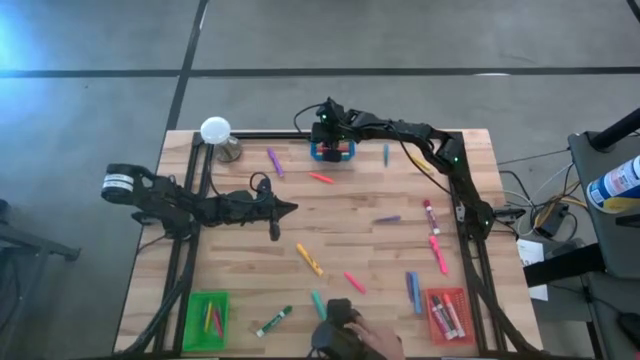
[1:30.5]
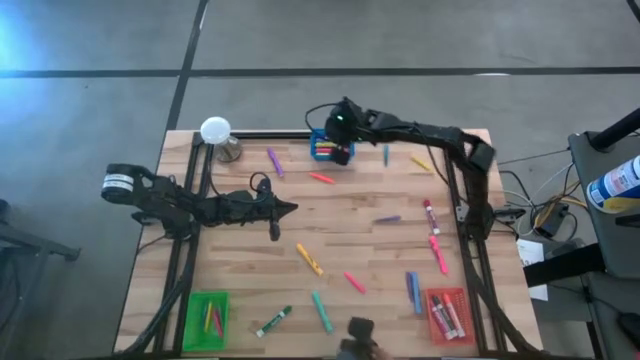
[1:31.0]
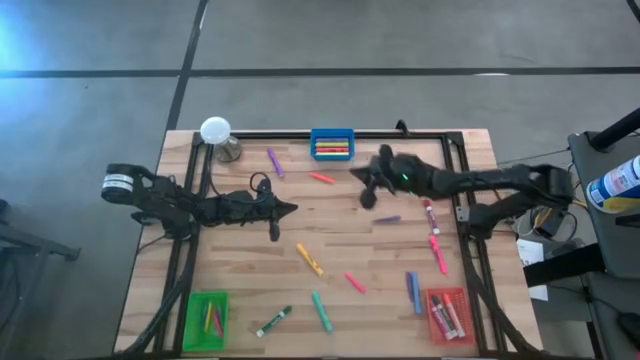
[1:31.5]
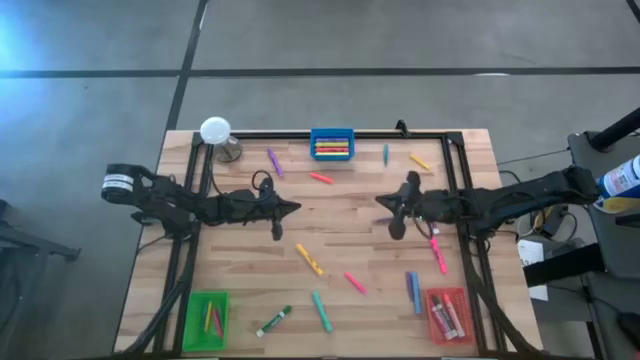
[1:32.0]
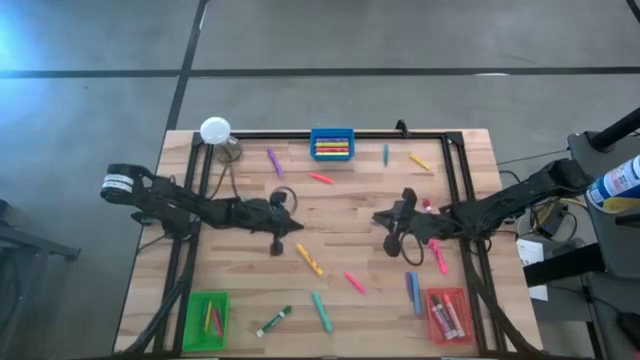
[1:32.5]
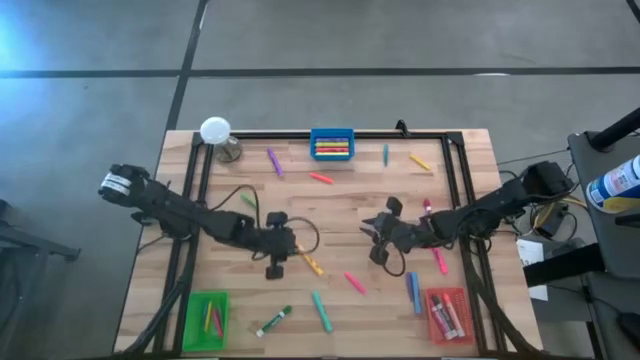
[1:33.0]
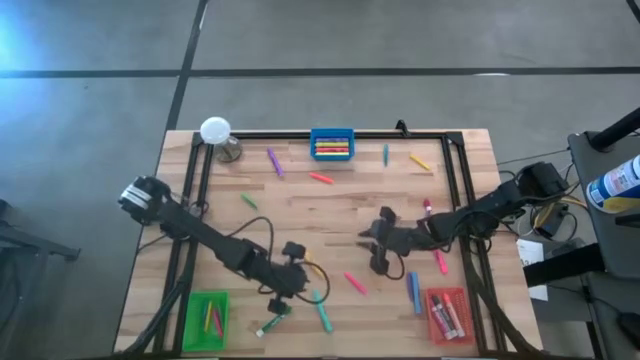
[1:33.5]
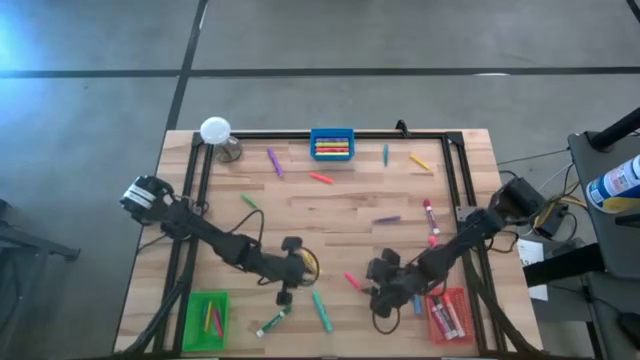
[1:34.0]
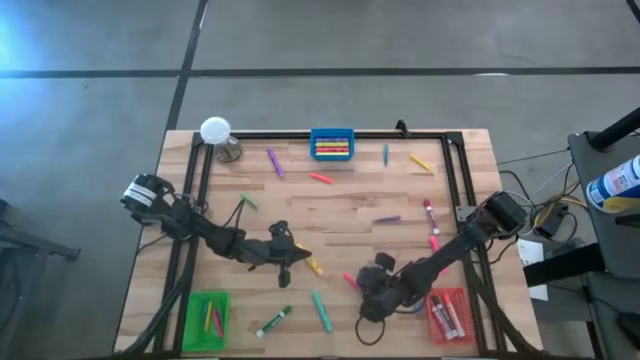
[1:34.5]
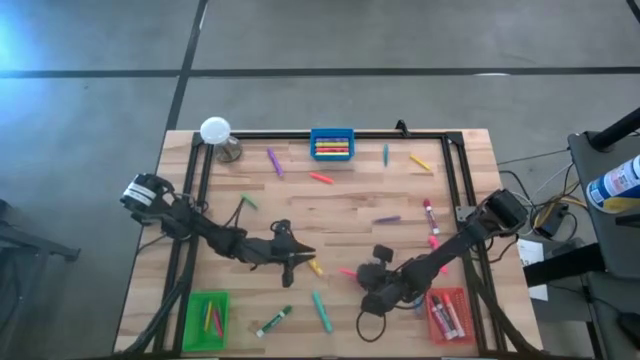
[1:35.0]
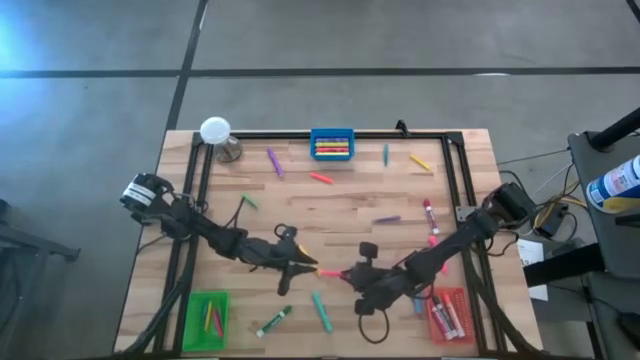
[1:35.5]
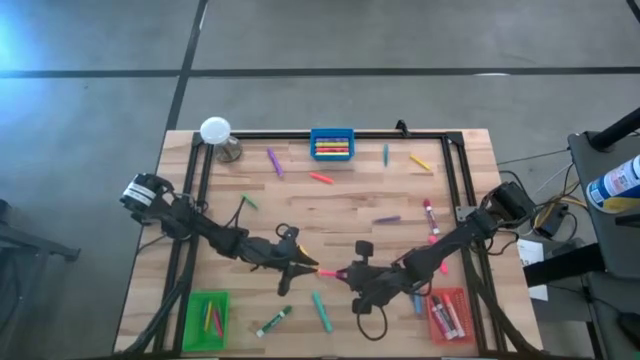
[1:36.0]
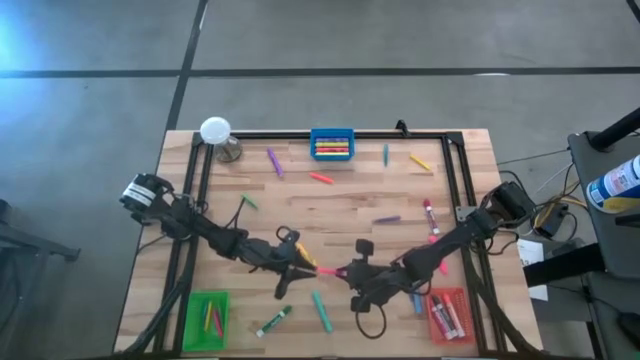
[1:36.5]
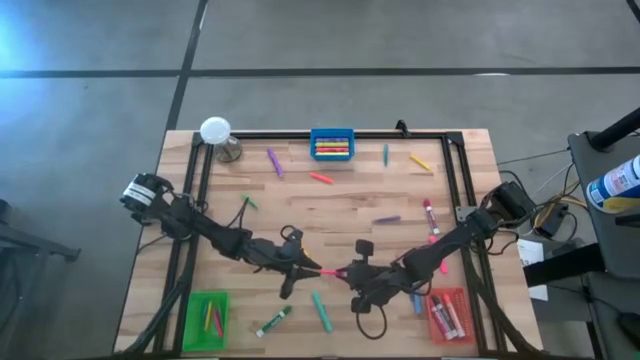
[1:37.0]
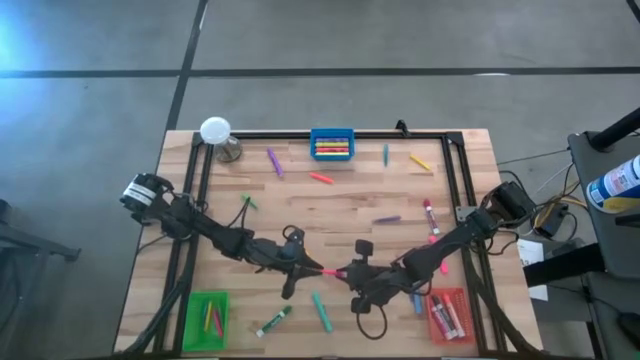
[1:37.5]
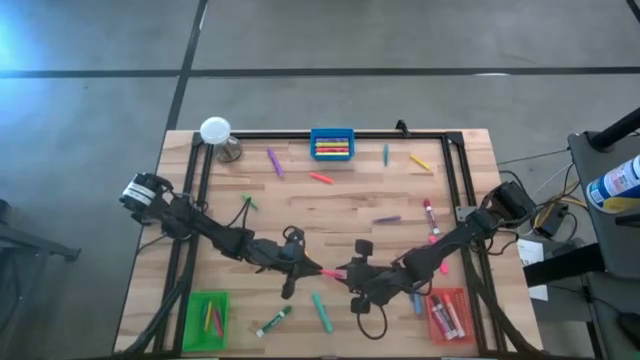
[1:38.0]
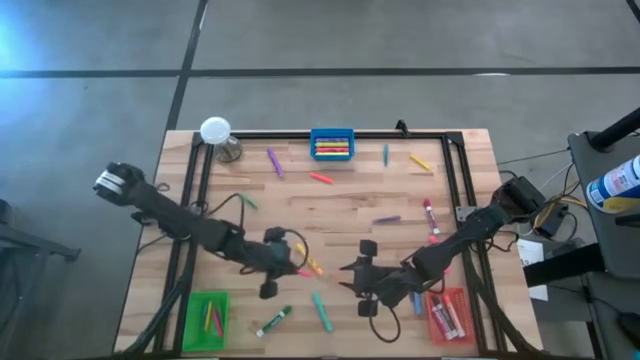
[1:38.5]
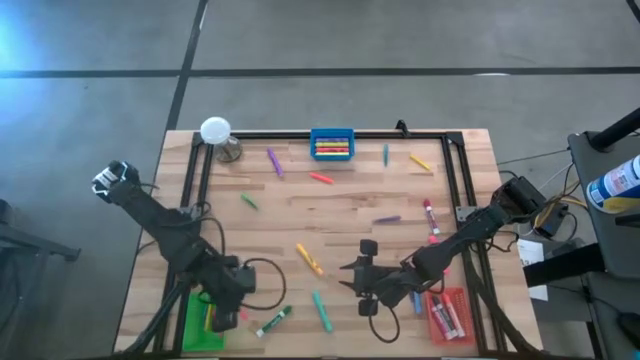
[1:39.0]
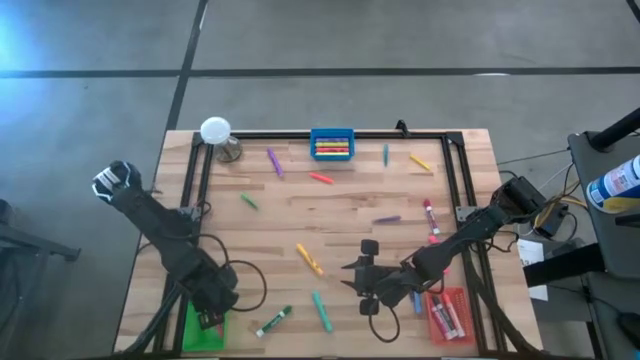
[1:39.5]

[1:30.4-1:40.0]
Task: Pick & Place Markers
Put the pink pen into the green bin

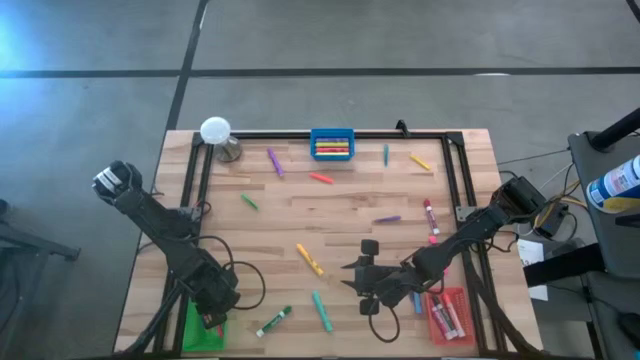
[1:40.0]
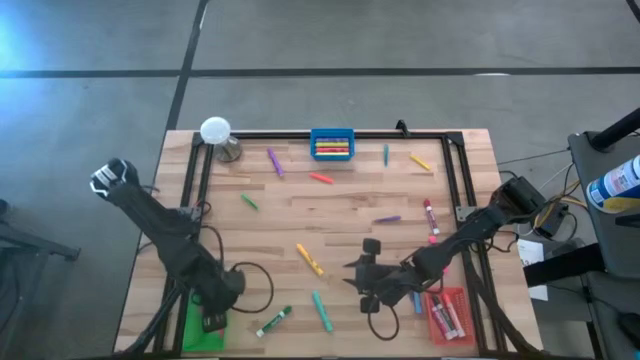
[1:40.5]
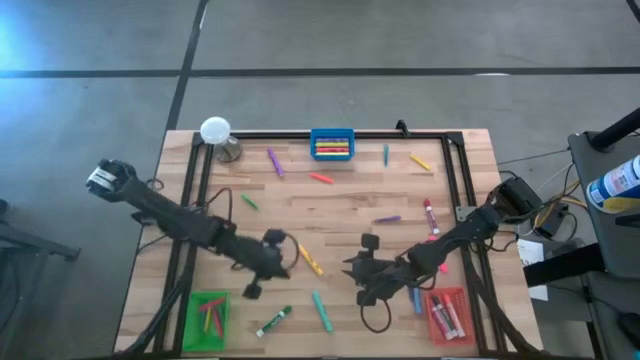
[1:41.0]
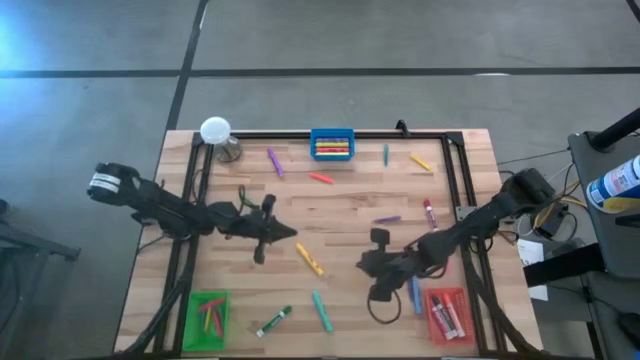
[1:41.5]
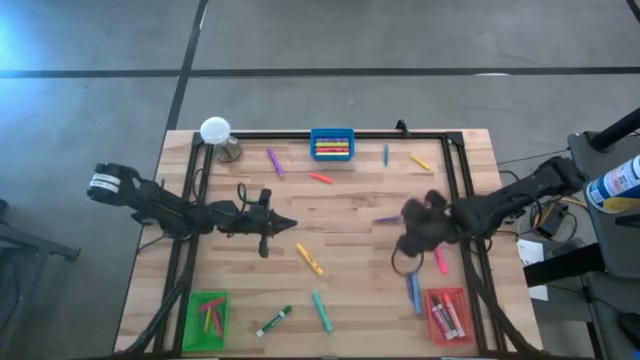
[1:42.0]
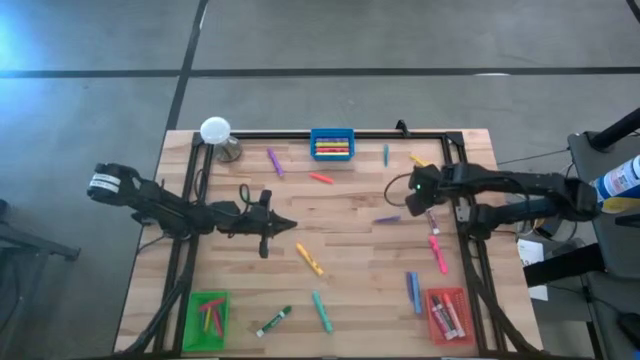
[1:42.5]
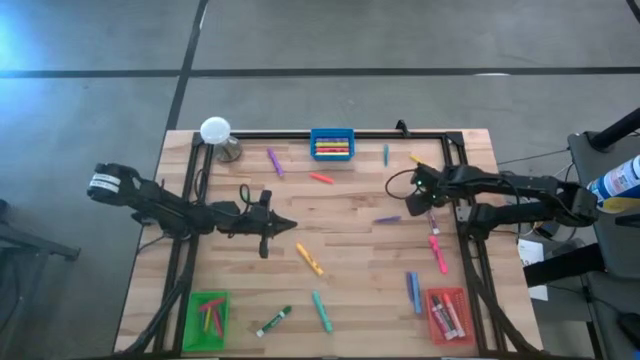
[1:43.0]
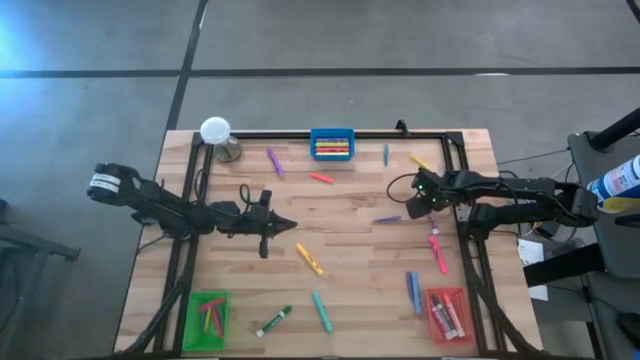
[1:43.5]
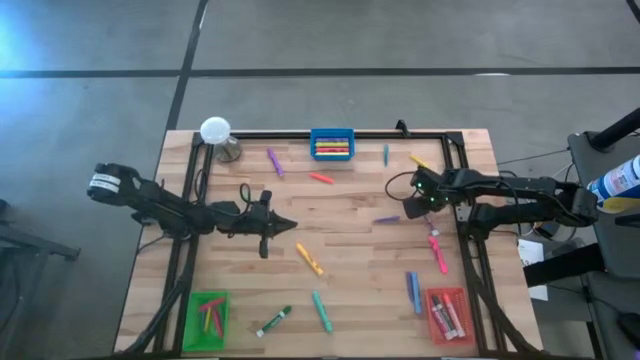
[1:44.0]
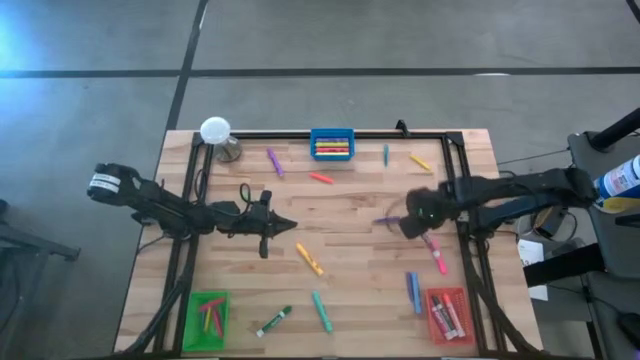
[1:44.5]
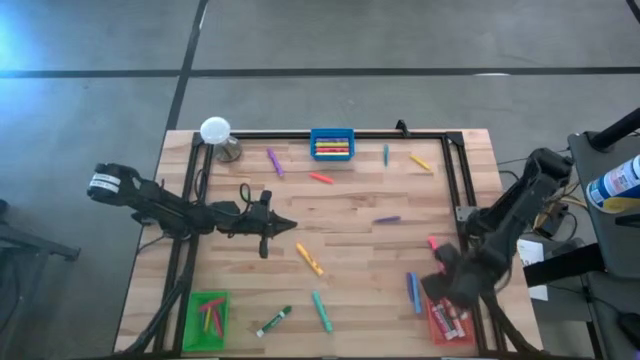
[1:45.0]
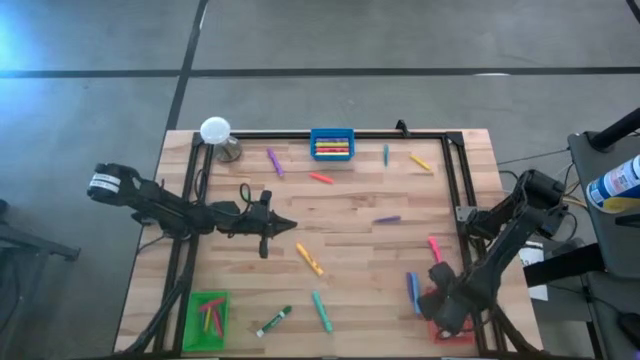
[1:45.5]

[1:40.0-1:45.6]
Put the red marker into the orange bin

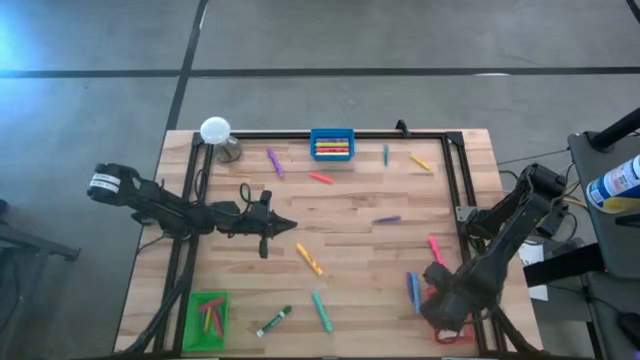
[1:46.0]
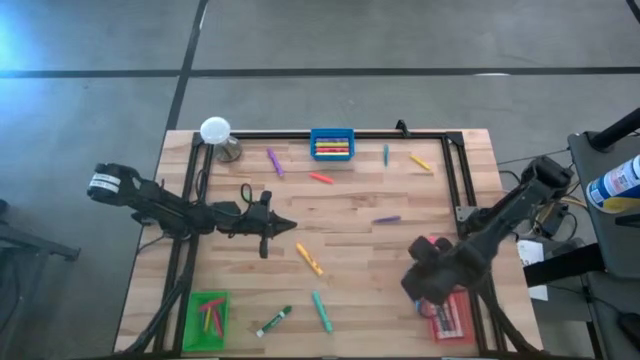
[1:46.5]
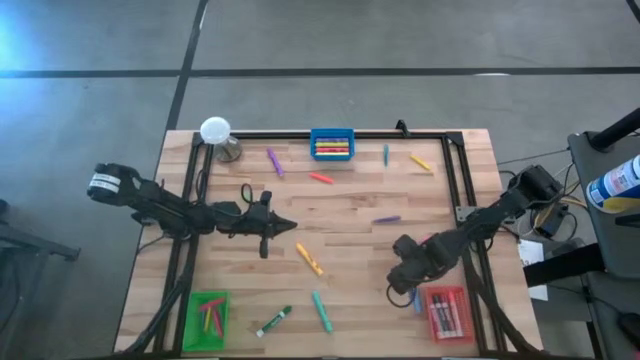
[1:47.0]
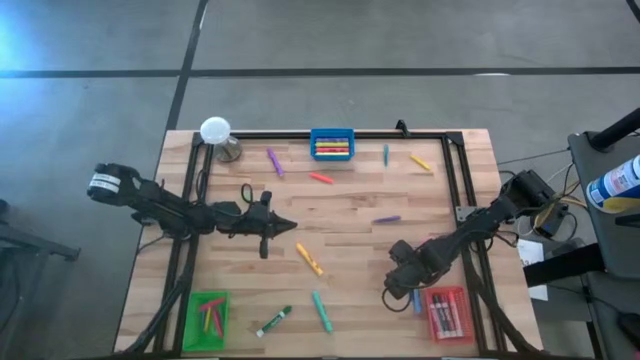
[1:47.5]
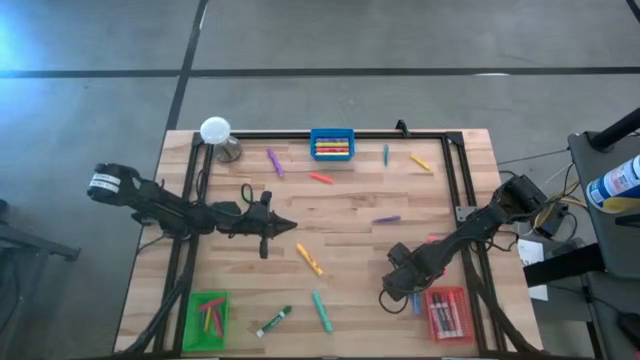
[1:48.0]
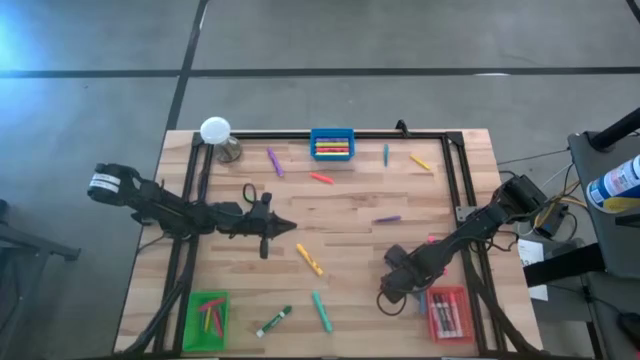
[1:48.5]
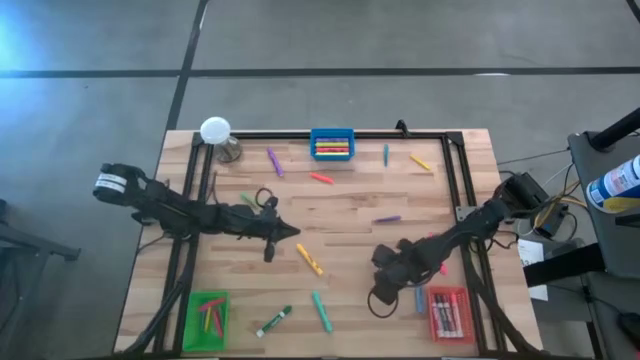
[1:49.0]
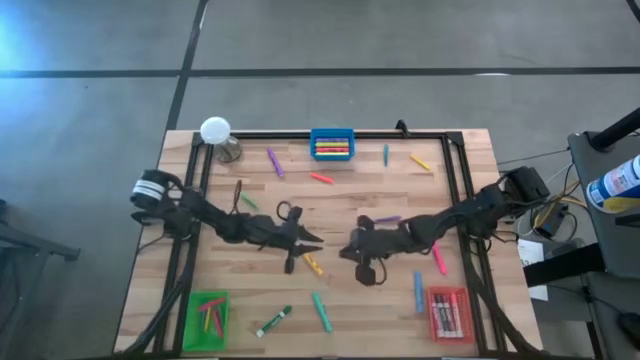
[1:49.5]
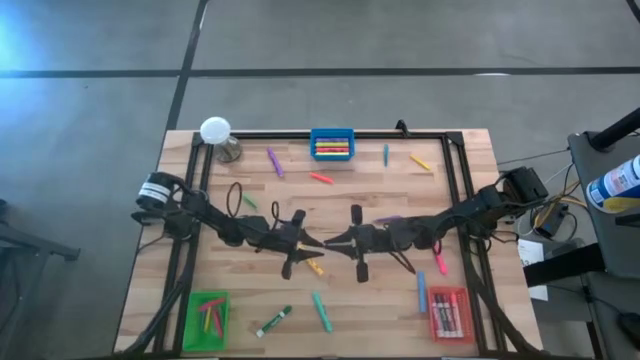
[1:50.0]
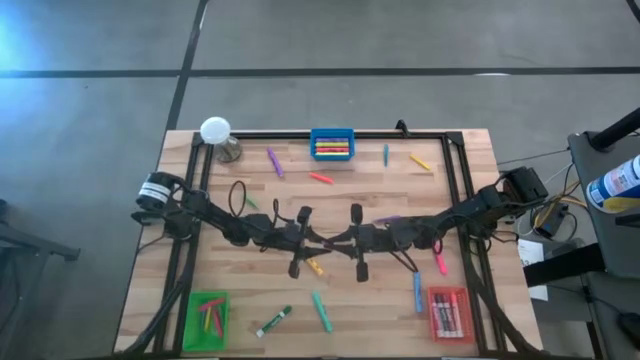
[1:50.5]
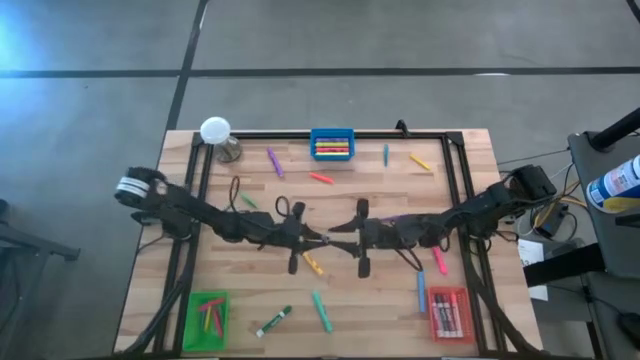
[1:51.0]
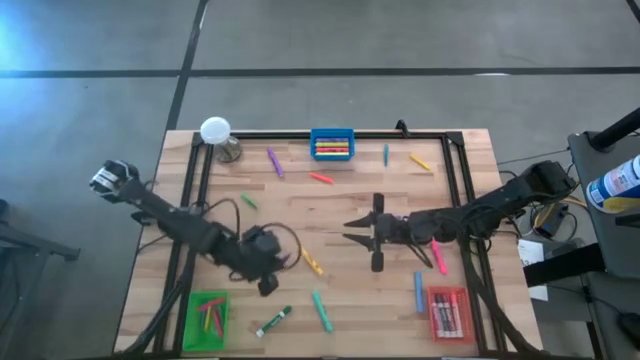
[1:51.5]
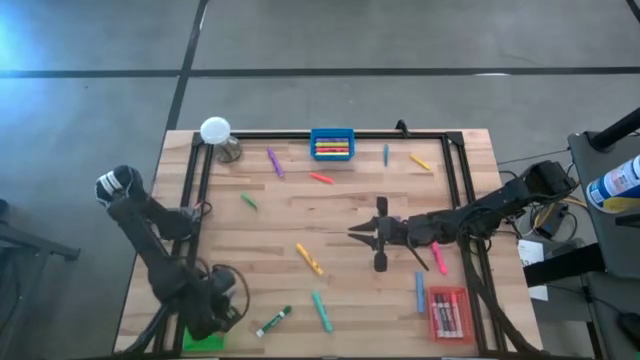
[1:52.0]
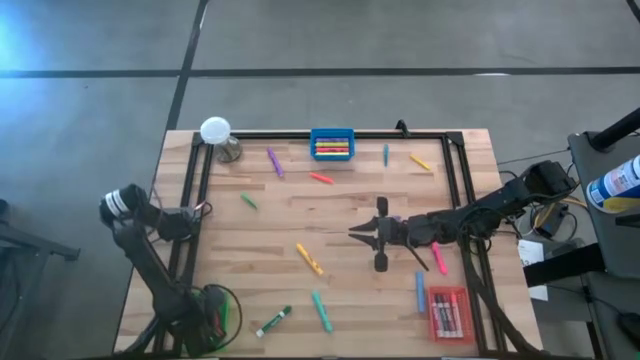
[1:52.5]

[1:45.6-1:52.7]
Put the bottom violet pen into the green bin
